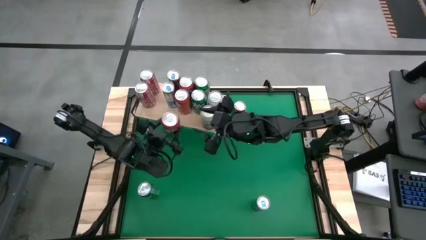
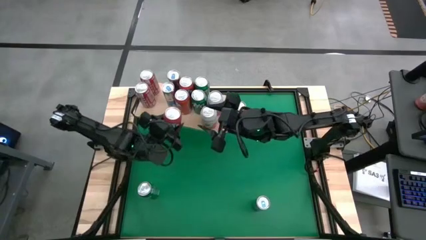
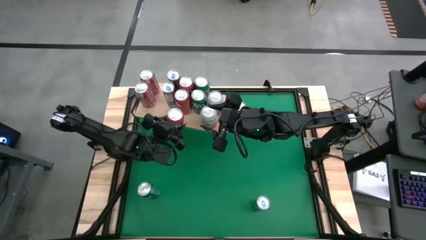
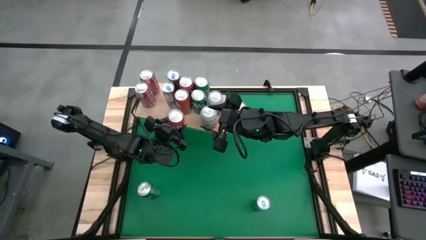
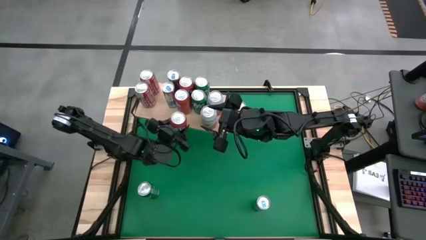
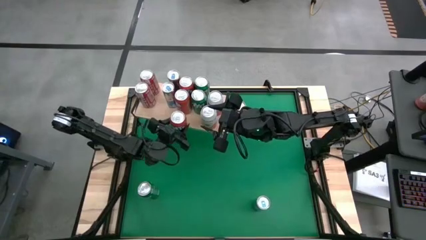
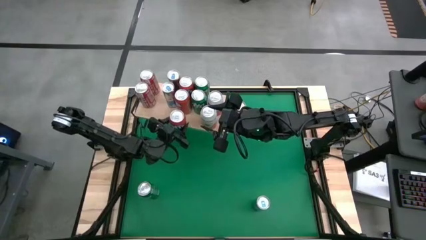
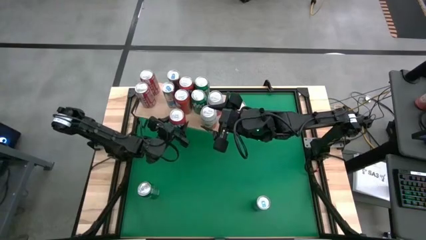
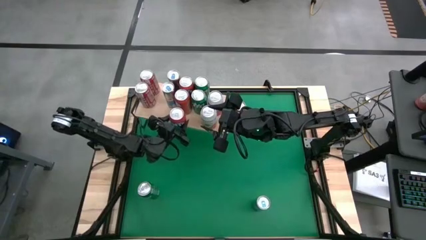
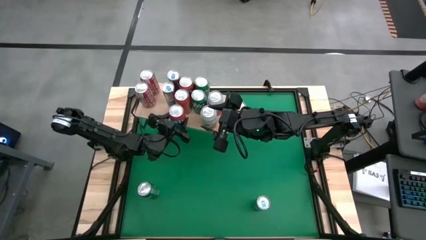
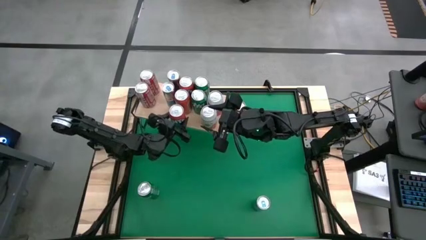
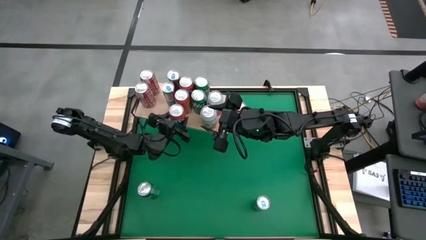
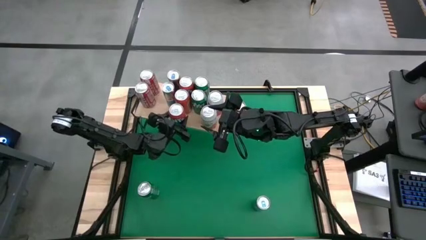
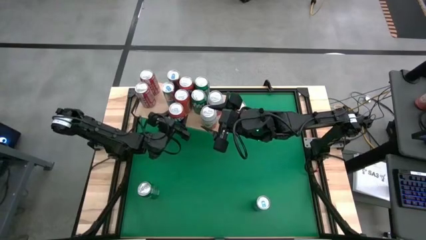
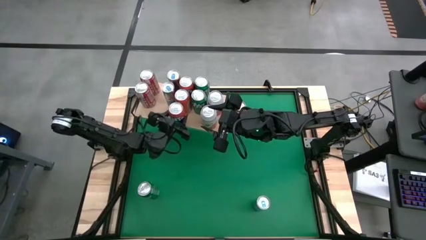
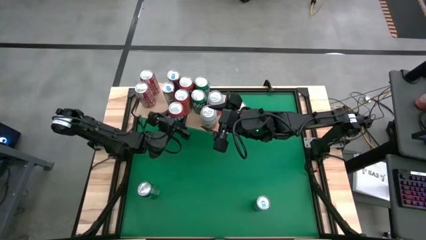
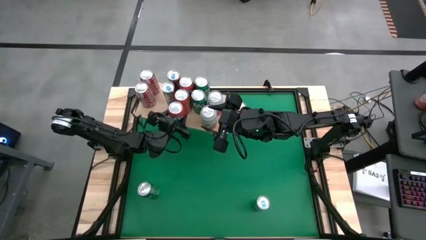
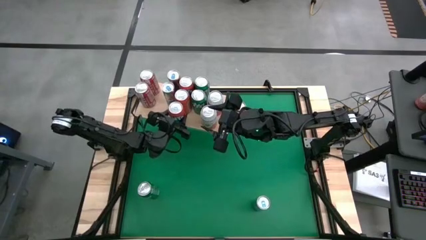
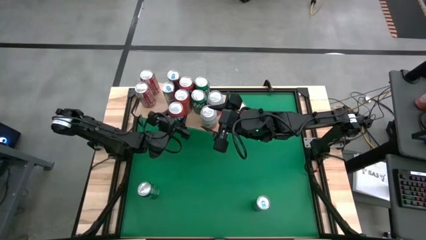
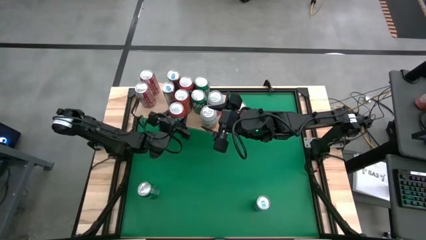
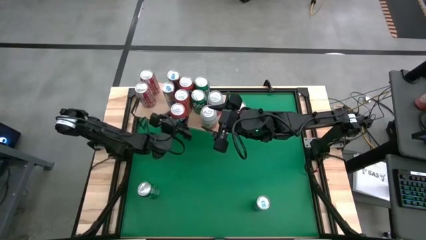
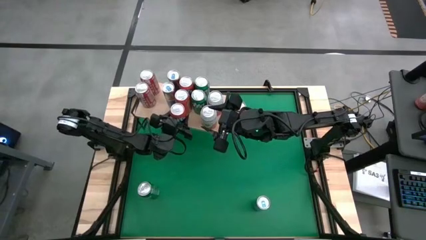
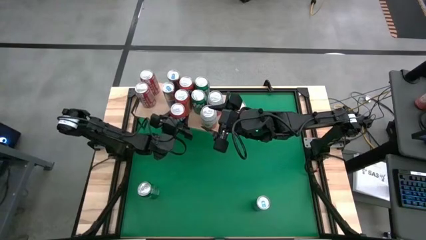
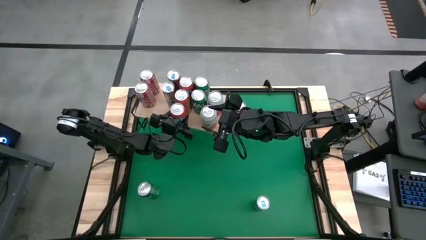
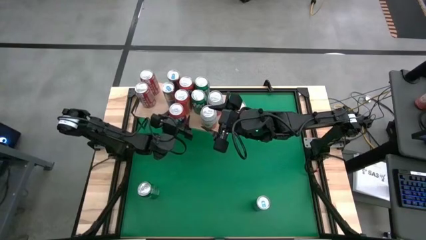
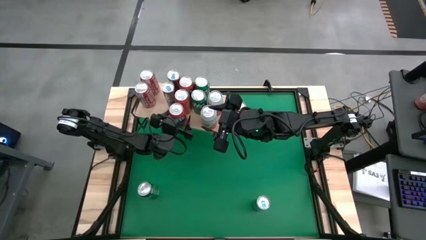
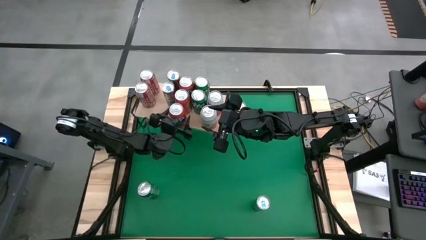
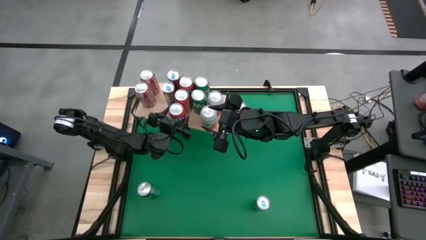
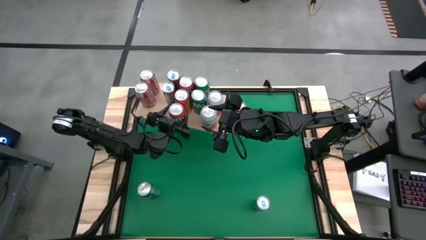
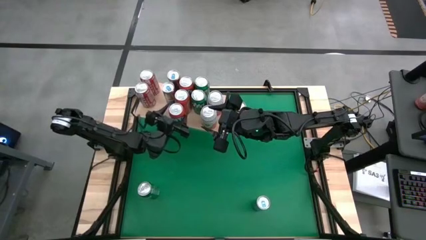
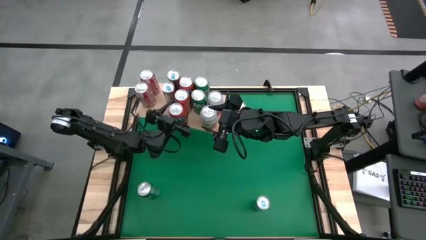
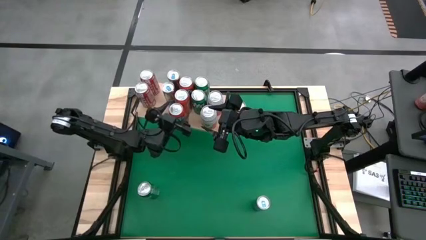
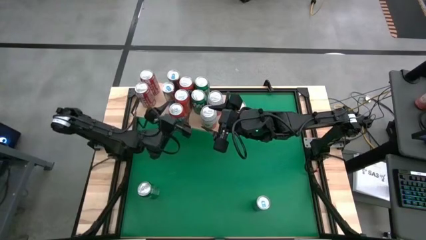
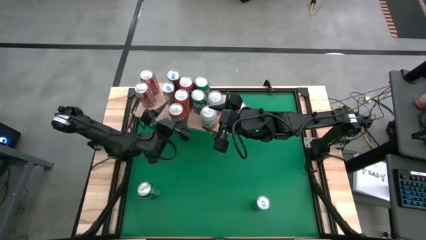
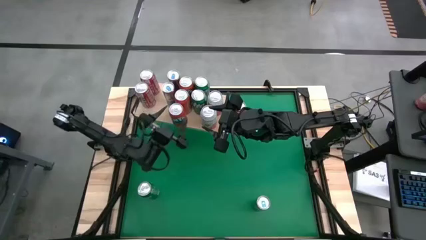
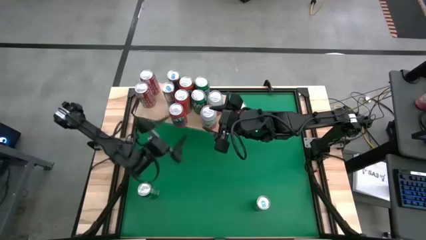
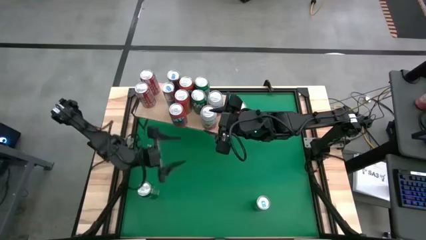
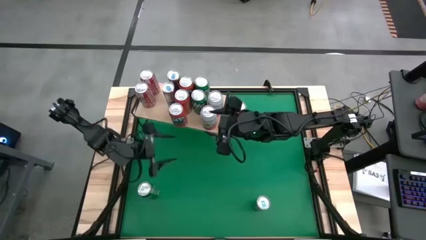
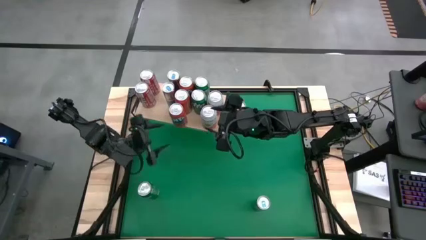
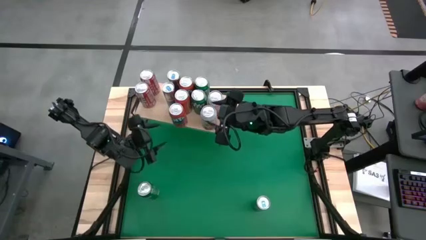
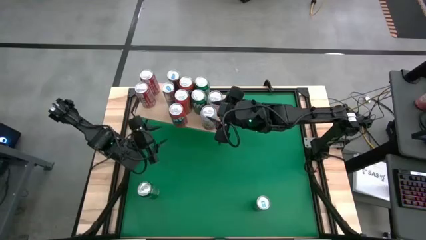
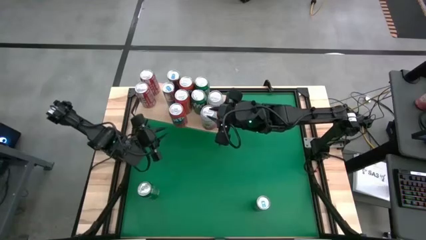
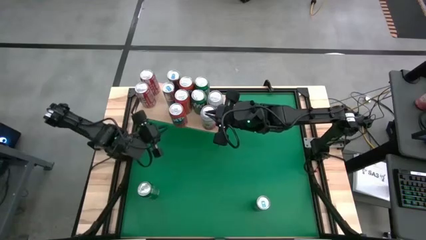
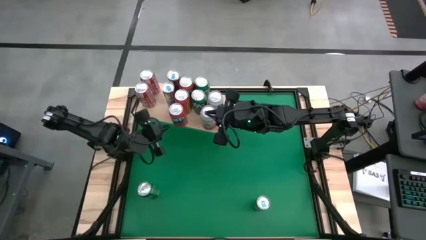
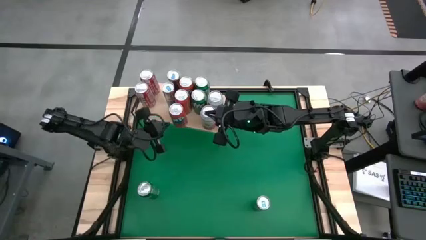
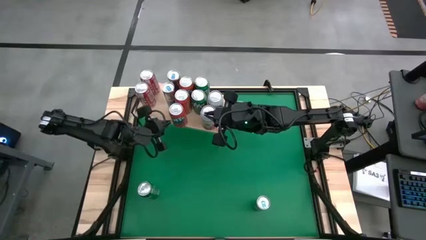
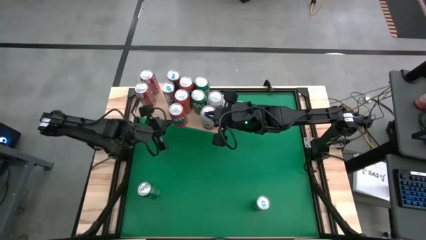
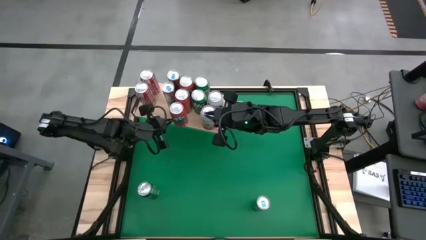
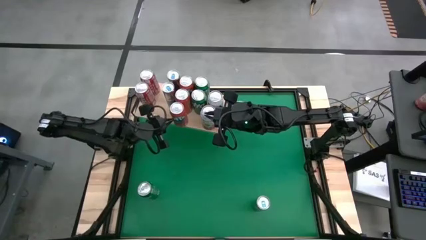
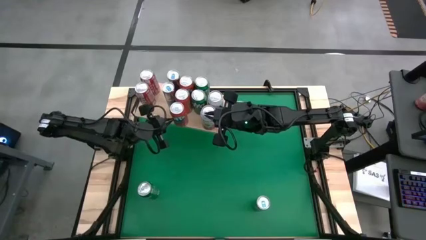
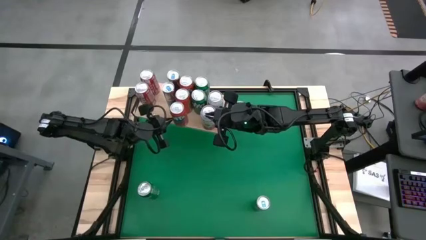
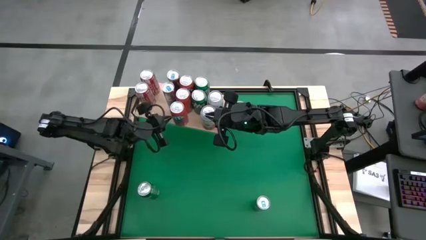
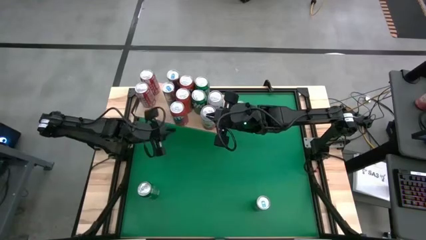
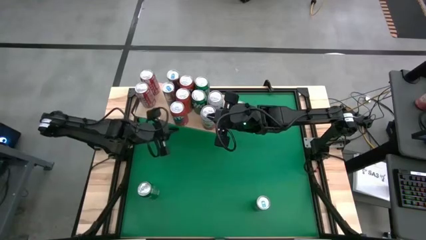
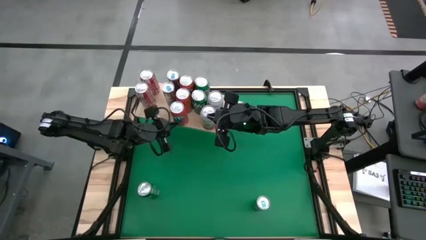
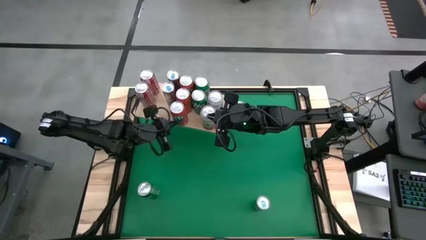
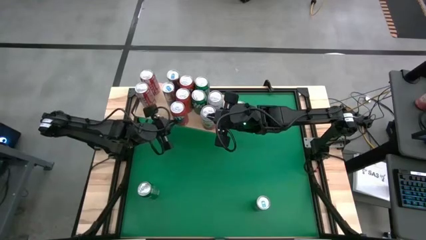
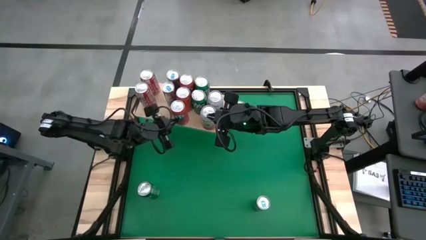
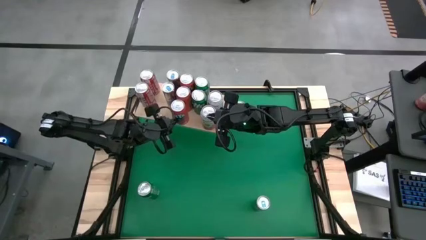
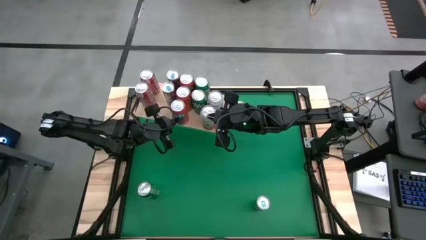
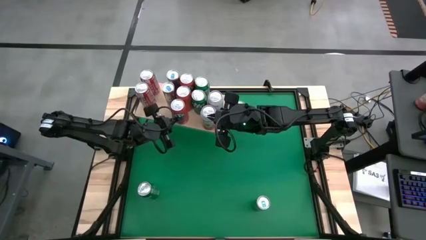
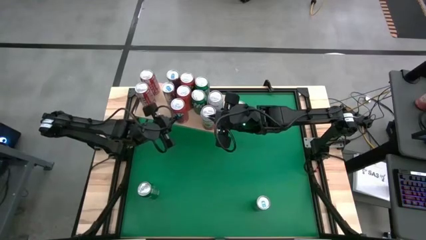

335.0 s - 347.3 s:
Task: Place canned beverage on shelf
Put the red soda can on the shelf aligned with the other red soda can

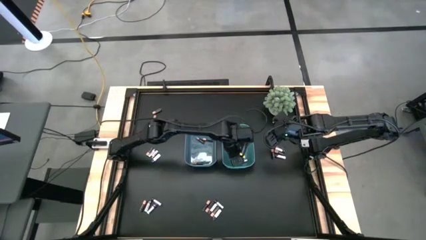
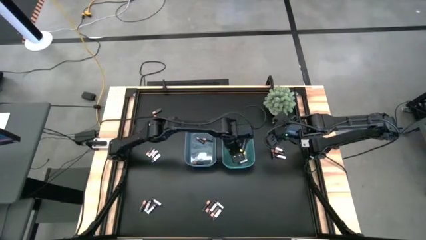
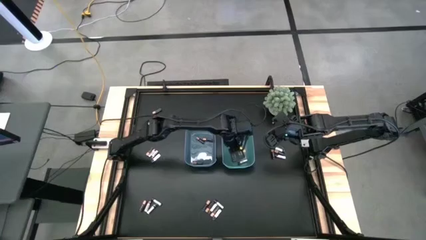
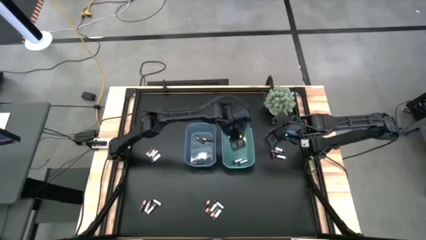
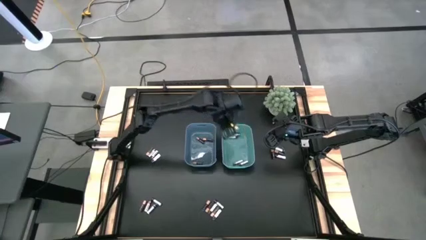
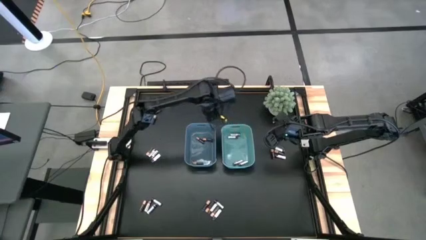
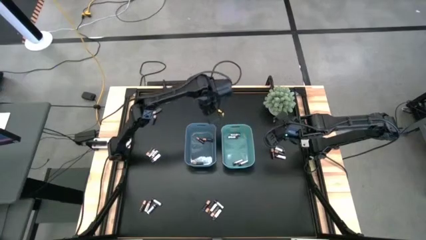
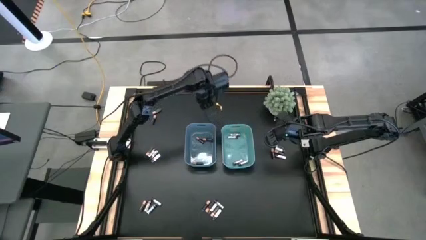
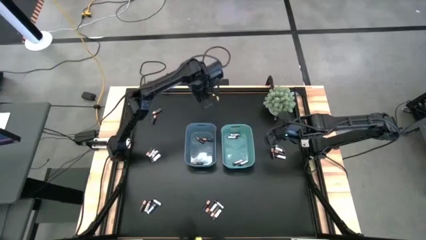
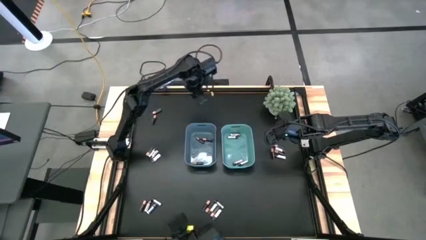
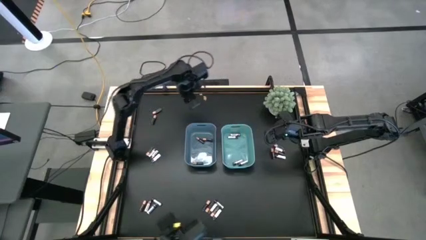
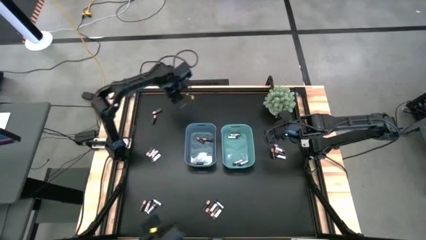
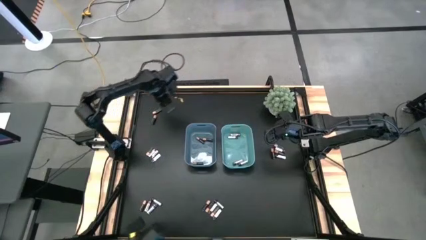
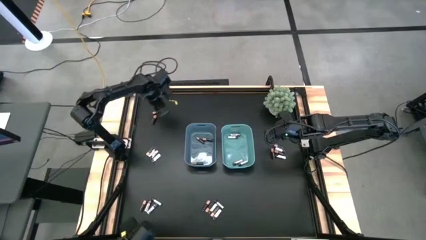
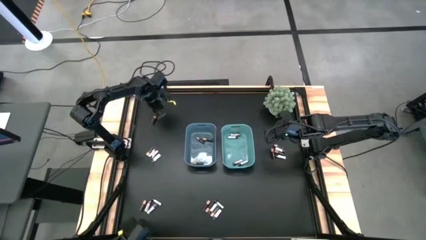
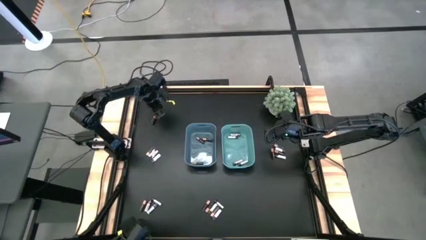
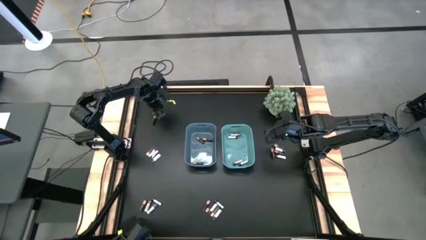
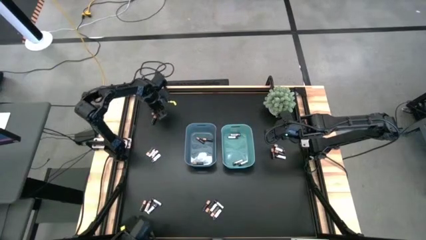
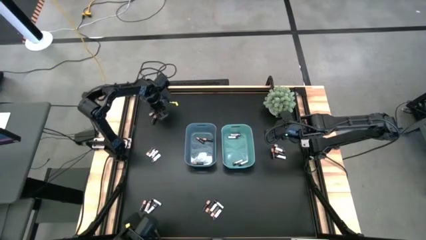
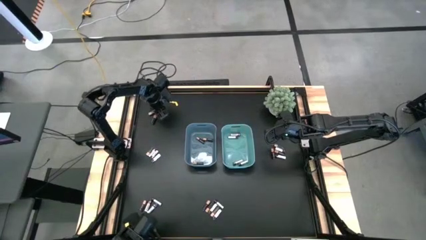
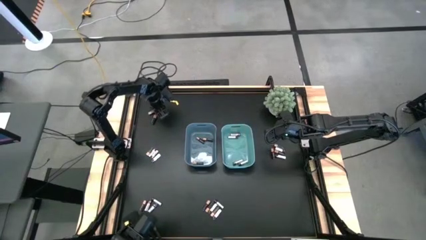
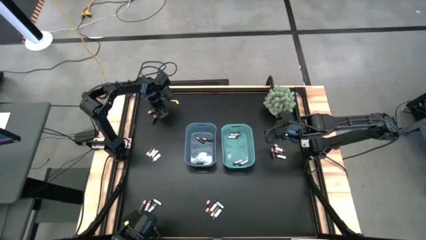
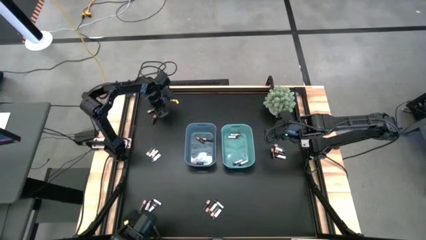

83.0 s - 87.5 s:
Task: Sort batteries
Put the black battery into the blue bin
